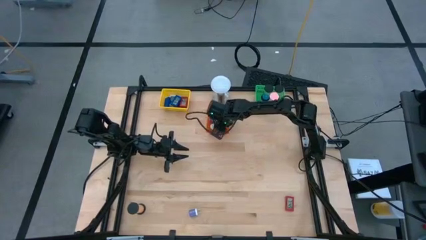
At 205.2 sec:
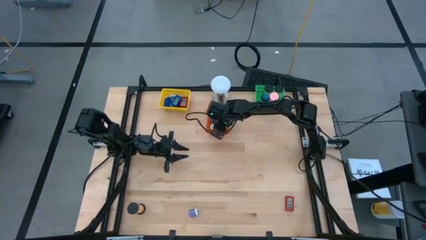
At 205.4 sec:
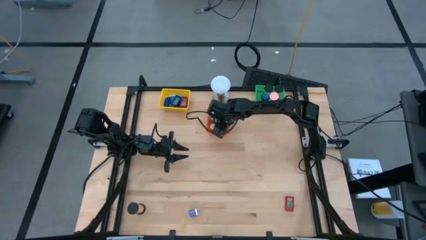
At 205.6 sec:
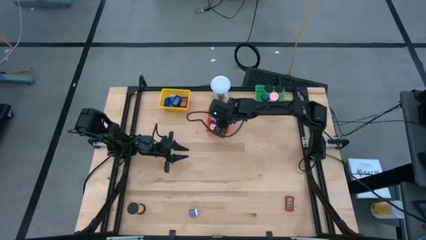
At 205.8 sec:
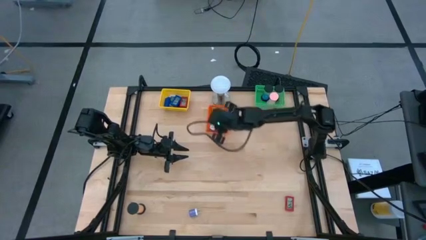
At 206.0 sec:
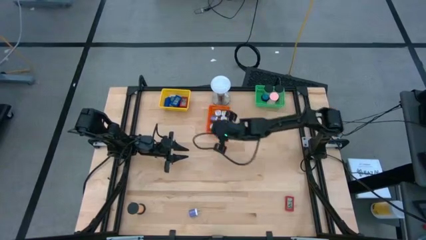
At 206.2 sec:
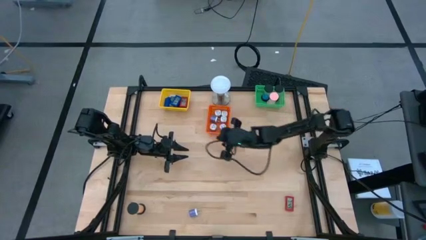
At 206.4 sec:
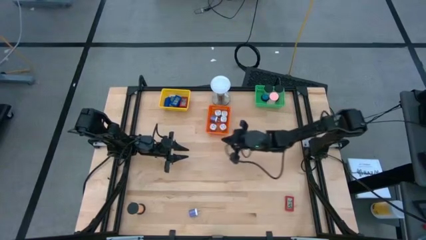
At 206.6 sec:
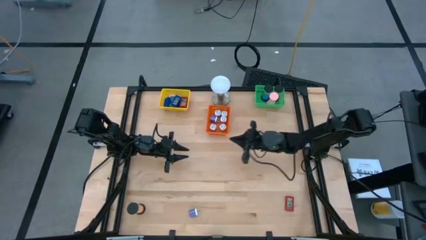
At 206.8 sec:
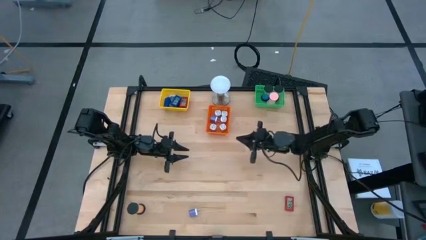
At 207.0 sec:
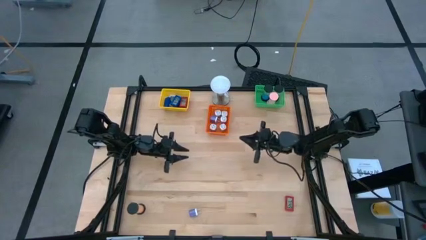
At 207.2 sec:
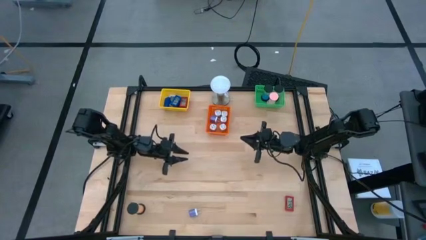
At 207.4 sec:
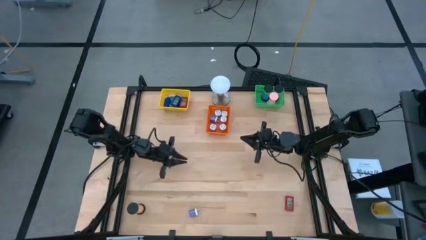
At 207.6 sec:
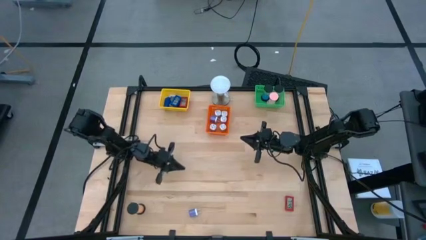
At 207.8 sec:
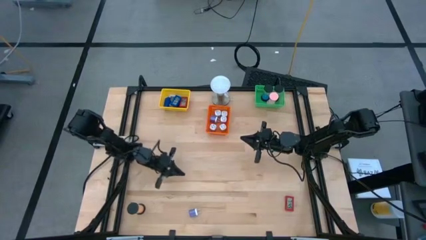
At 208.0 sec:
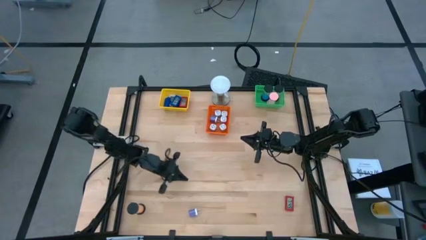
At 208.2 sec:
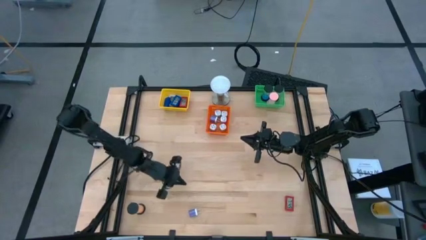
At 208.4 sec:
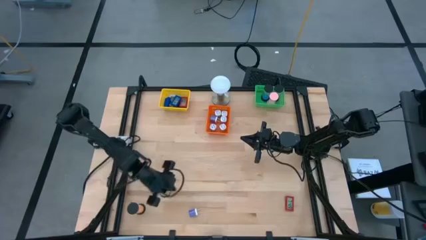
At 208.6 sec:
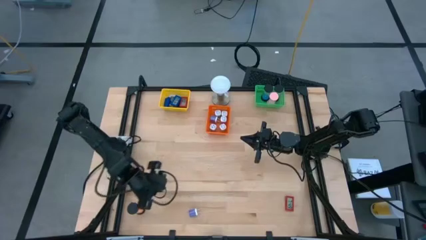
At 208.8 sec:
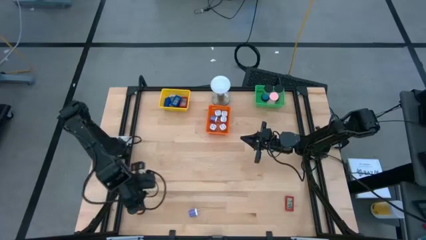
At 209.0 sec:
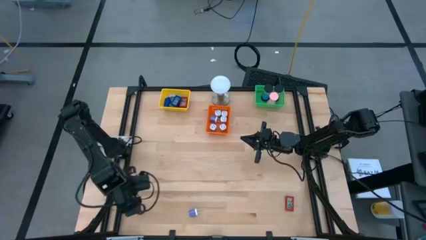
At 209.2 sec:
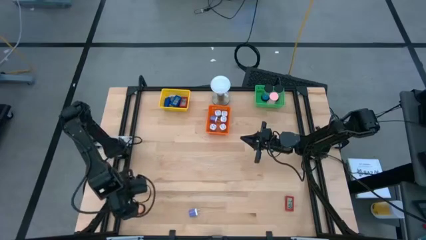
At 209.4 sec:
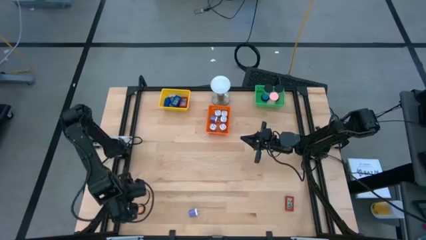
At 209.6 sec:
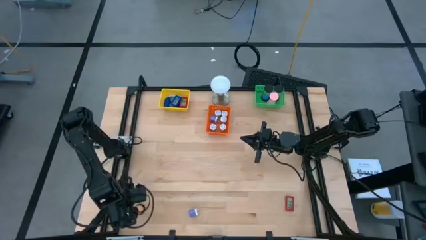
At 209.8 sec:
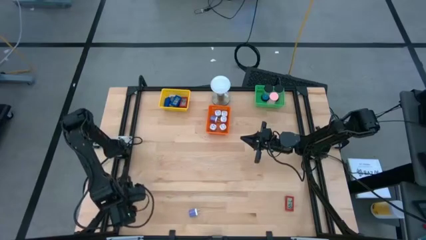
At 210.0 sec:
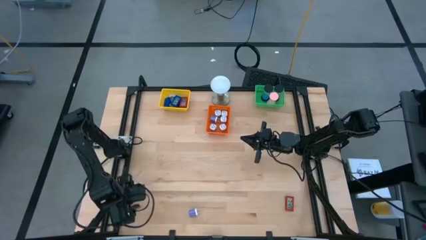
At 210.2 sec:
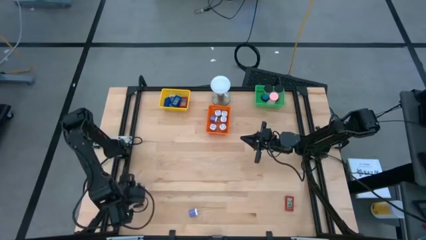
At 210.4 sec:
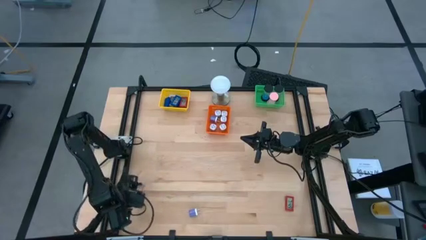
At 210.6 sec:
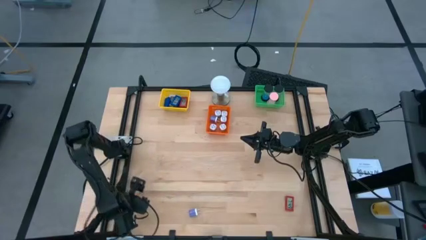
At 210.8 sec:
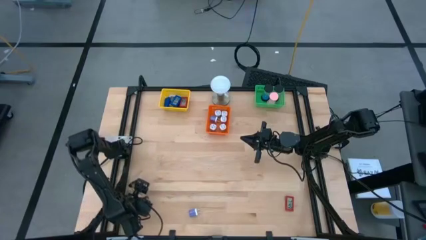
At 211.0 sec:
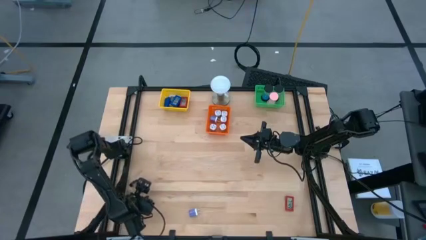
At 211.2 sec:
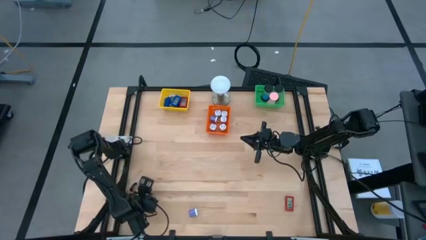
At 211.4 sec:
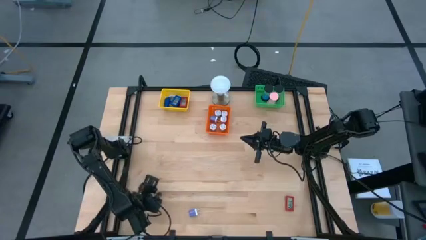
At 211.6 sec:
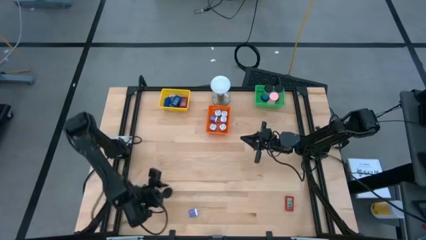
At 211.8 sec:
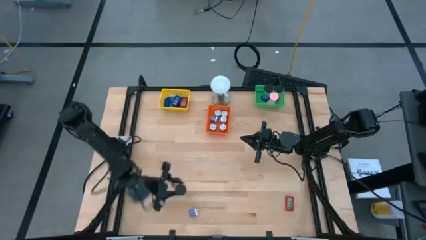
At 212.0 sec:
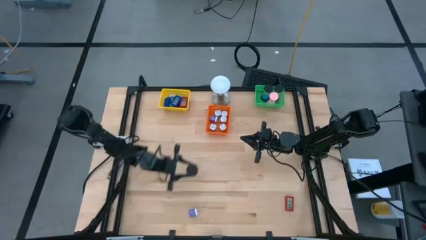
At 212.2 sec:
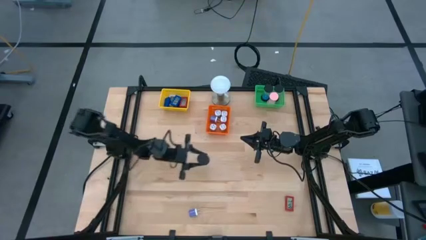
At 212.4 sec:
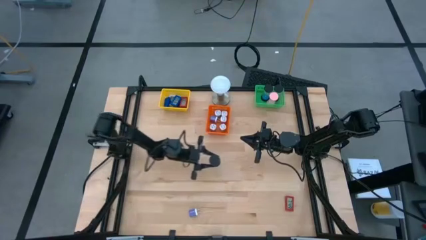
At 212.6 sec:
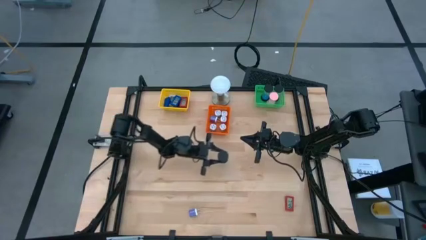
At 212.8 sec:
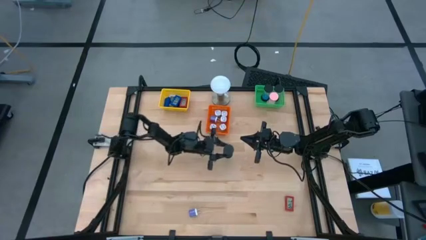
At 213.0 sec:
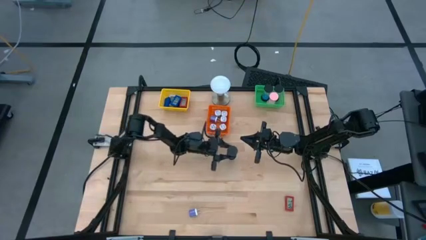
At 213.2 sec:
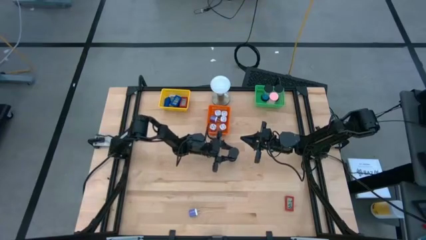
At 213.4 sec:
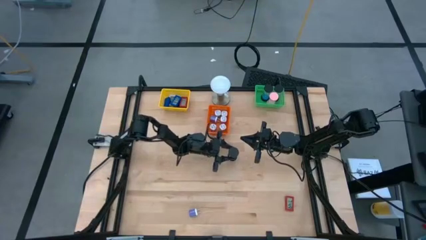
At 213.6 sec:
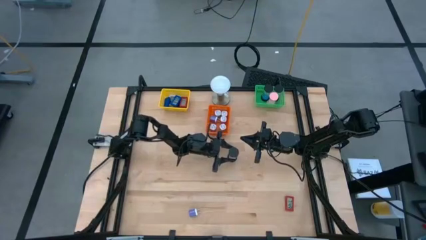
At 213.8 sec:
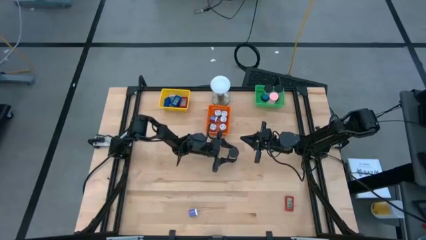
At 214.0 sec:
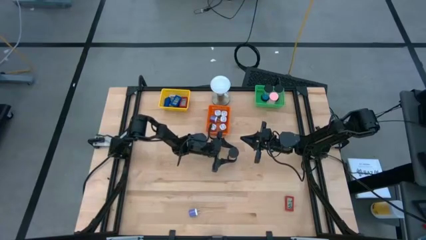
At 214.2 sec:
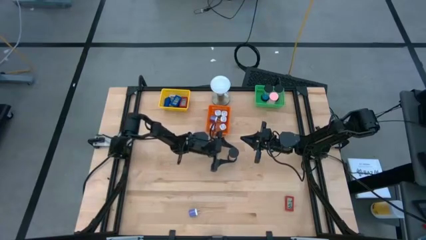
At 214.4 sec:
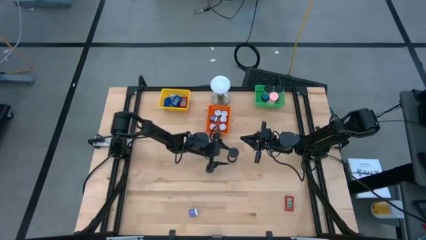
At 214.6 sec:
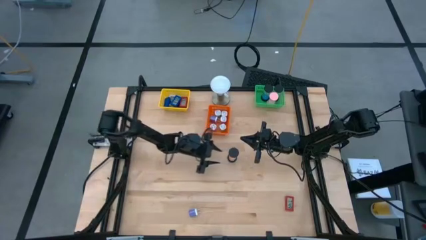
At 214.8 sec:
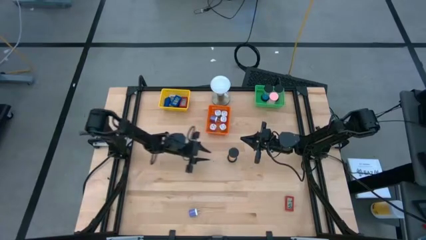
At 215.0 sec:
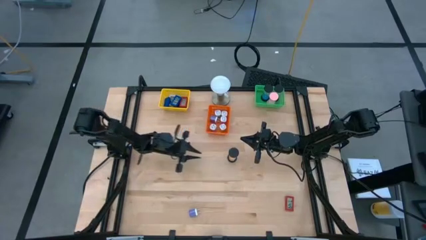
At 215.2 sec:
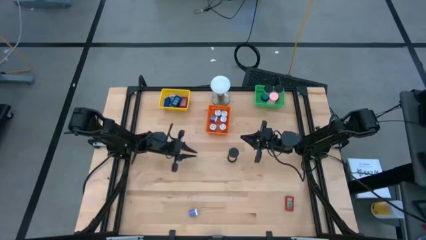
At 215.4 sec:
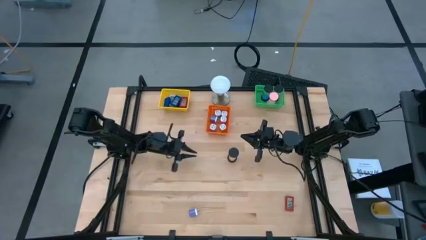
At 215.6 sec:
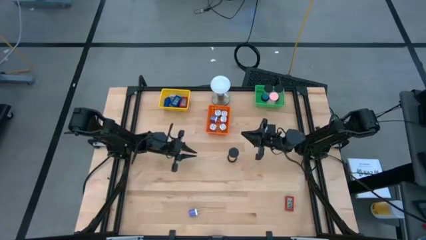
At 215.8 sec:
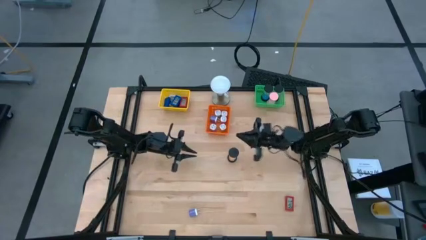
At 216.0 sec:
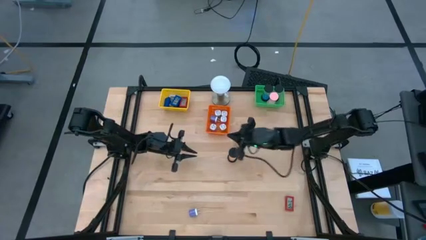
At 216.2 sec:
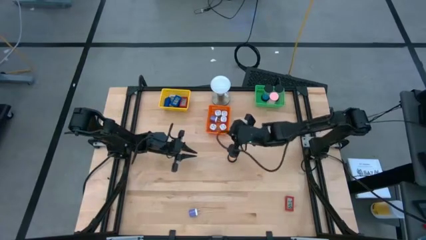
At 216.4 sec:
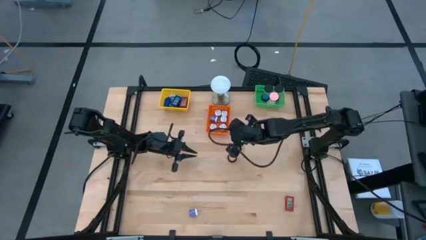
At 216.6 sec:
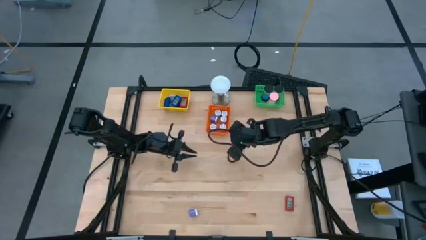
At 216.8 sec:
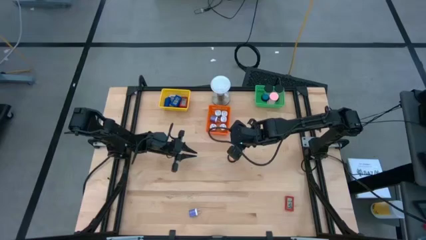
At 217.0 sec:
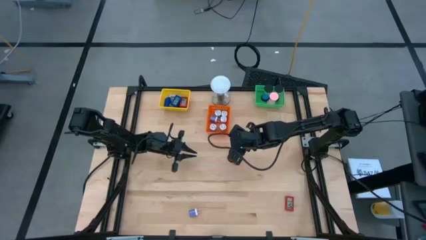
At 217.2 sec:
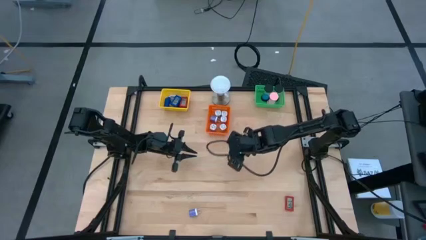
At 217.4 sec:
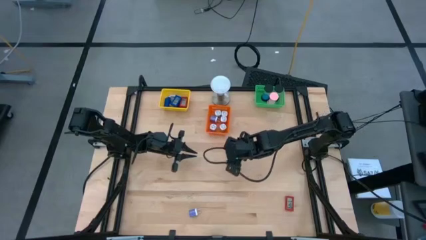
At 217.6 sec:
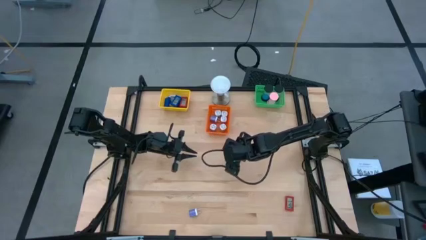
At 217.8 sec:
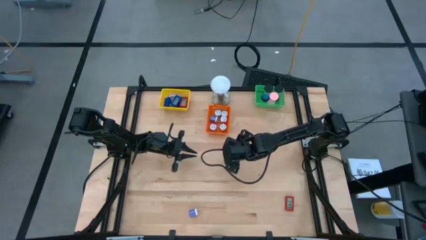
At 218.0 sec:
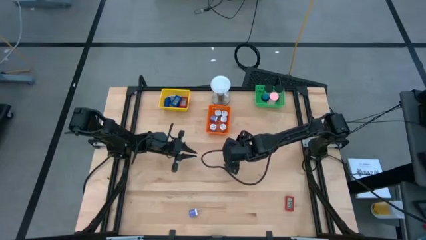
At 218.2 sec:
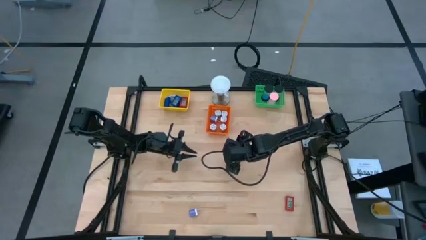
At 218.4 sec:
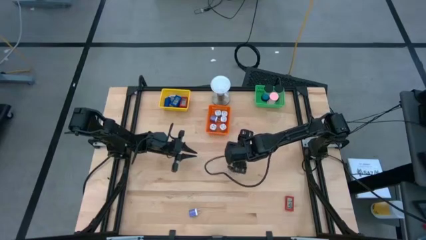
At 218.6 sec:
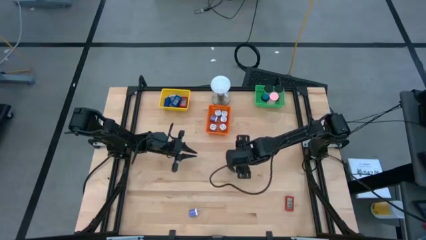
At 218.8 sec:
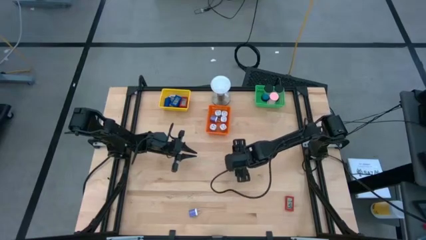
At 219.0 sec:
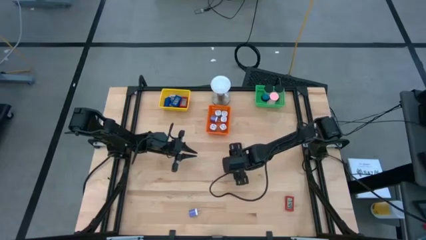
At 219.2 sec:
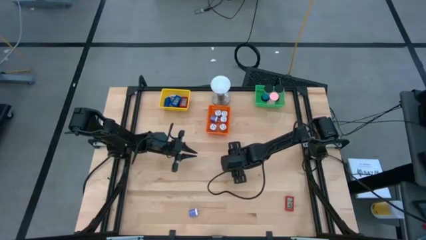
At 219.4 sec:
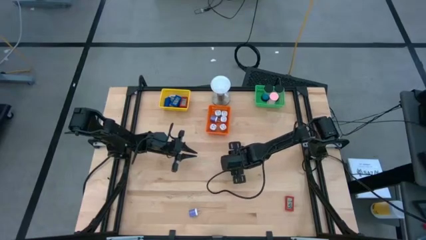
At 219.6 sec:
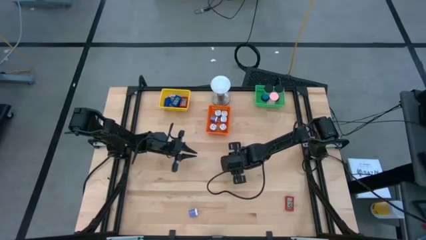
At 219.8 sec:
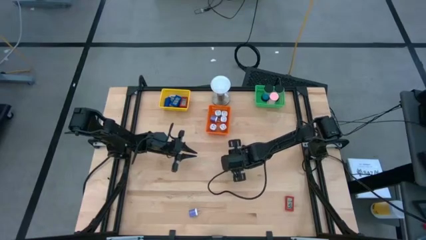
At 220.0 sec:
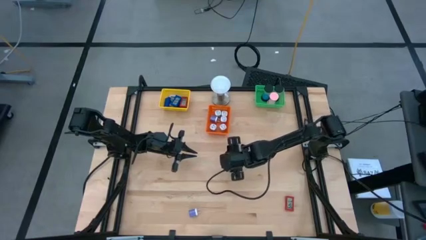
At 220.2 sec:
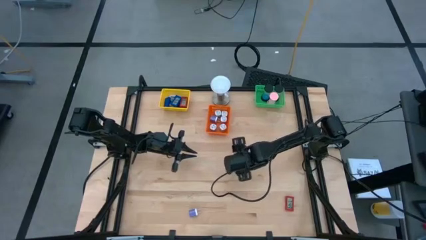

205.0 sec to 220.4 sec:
Task: Pick & Place Office items
Put the orange sandglass timer into the green bin
